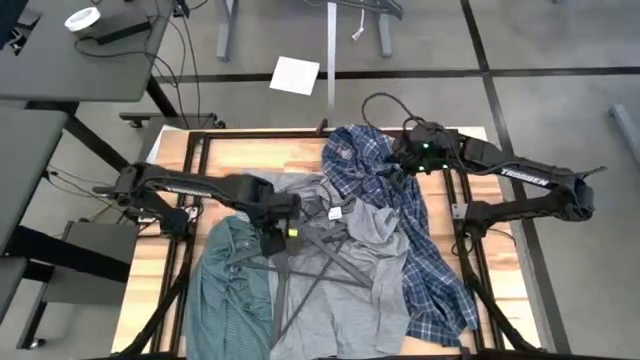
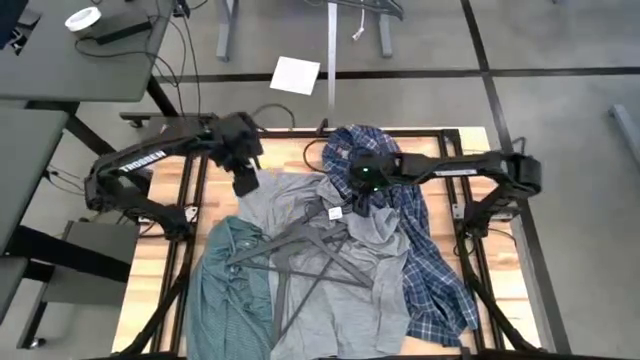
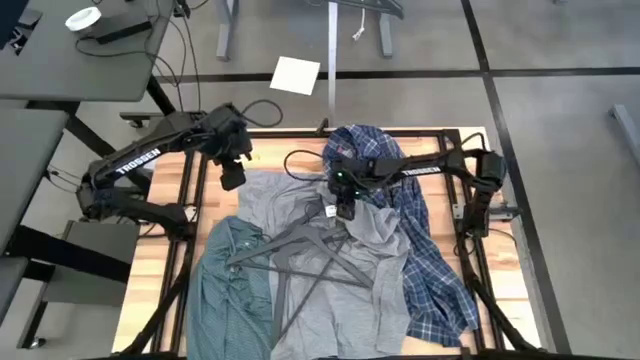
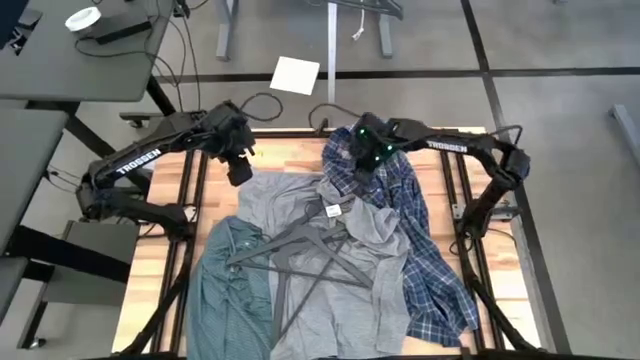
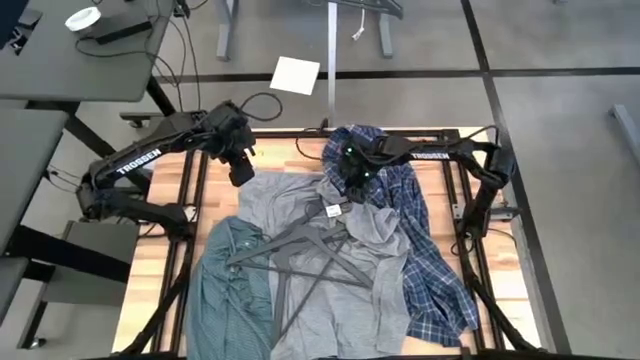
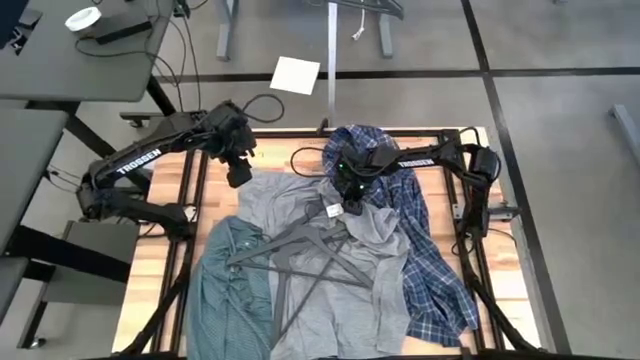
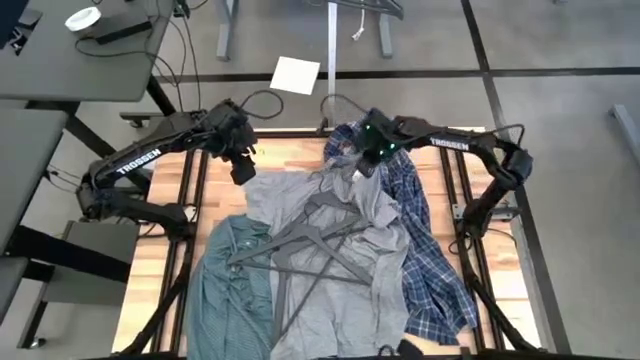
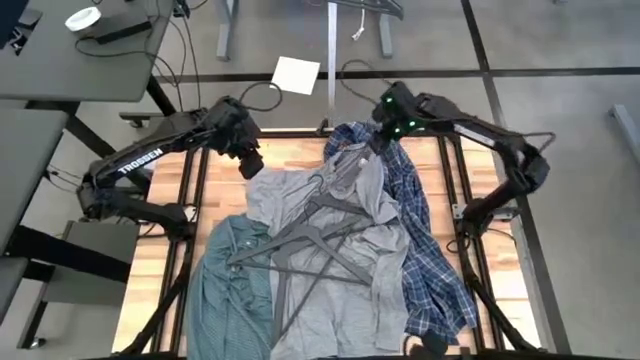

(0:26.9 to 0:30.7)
Task: Hang clothes
Put the gray t-shirt on the gray hanger

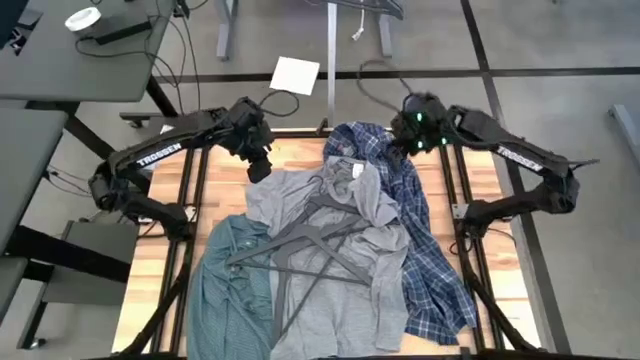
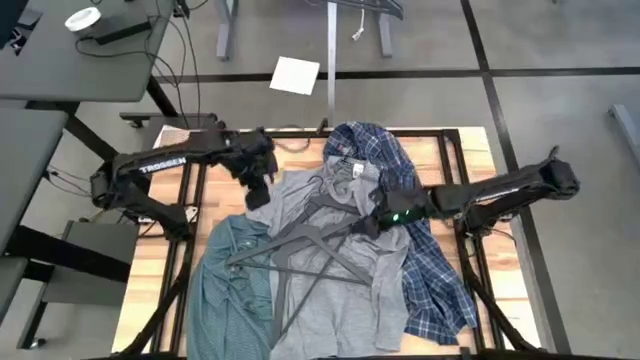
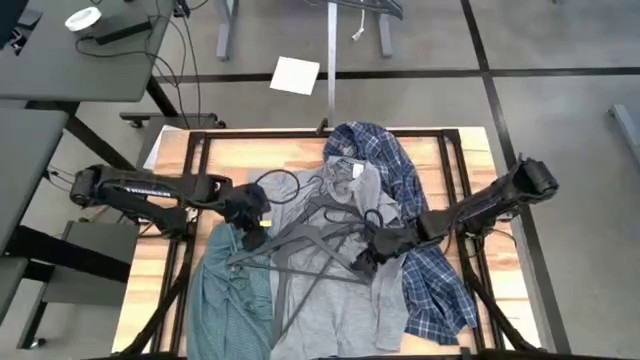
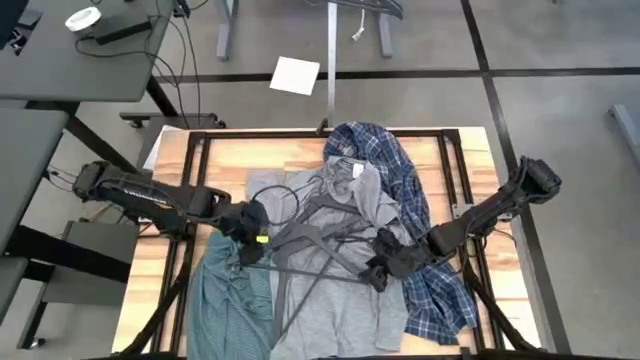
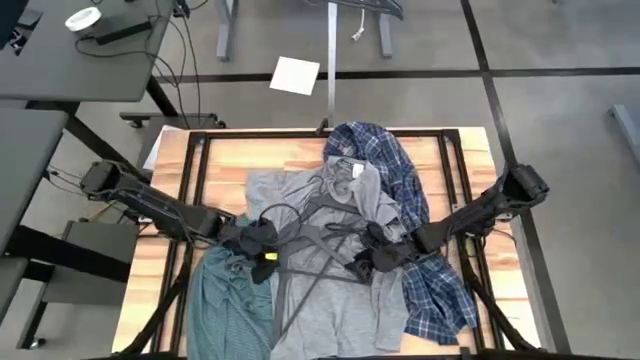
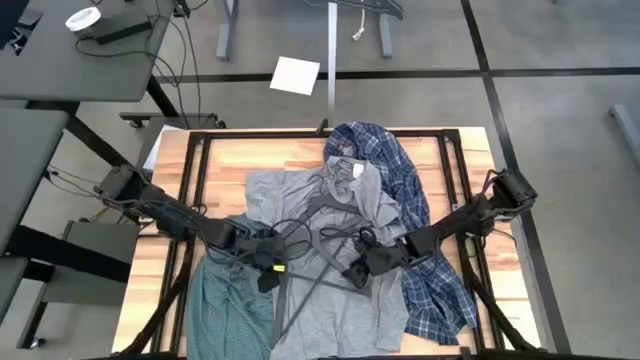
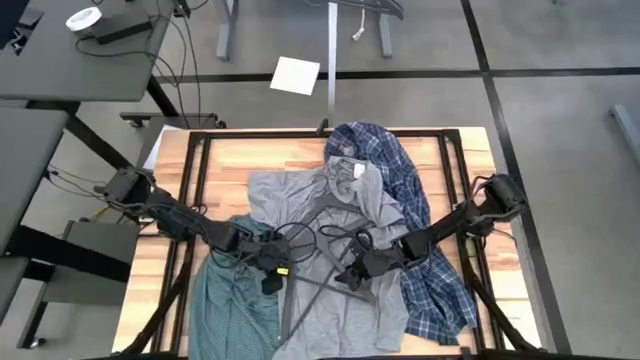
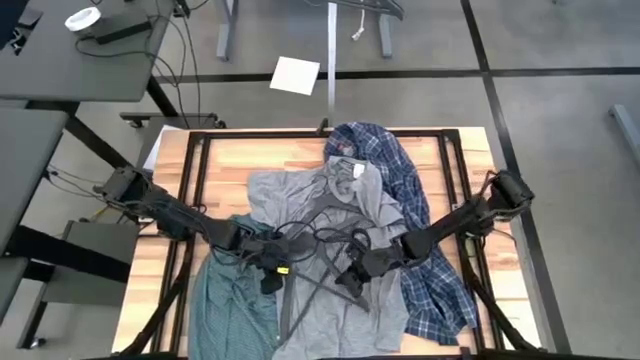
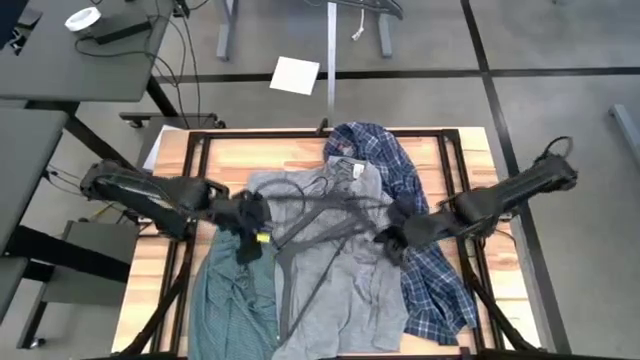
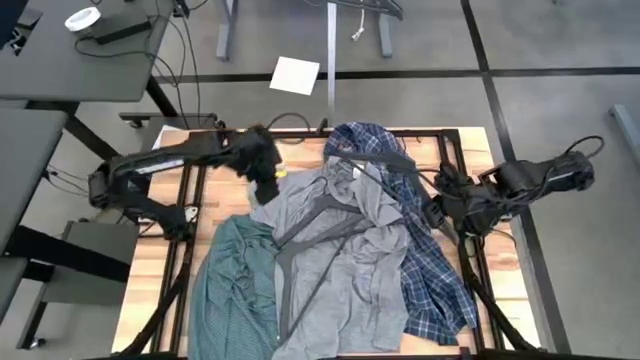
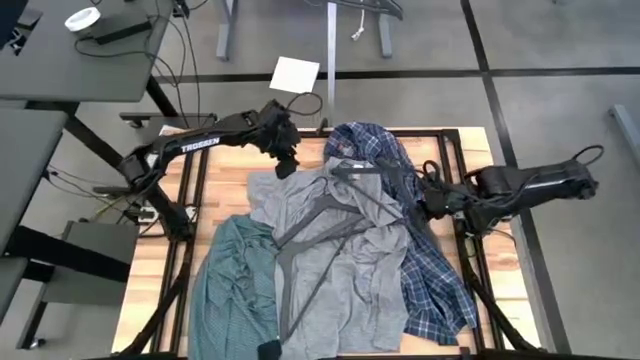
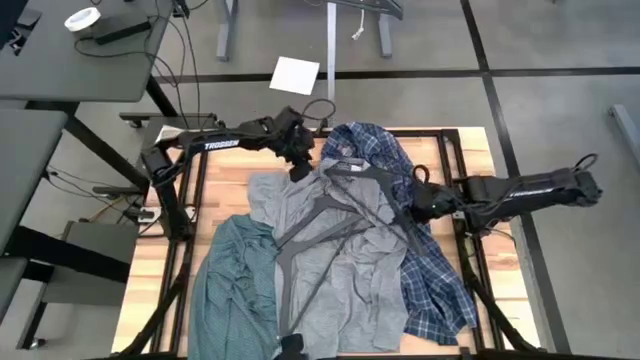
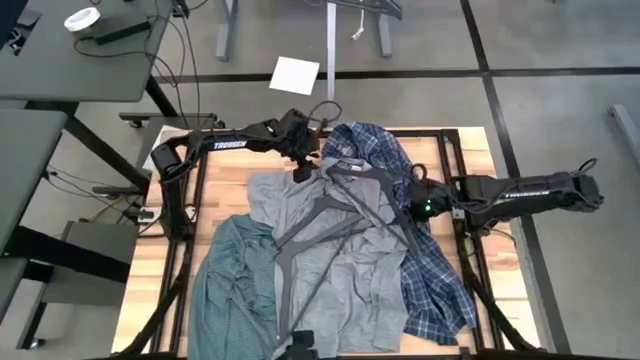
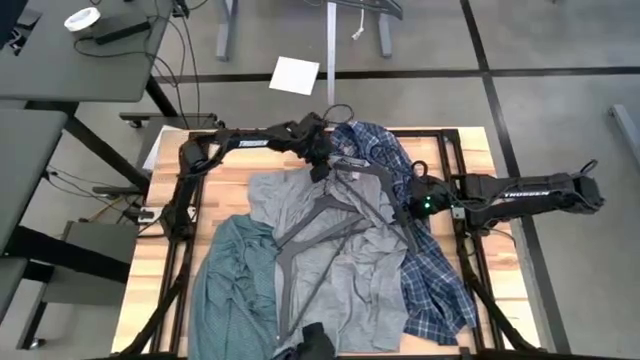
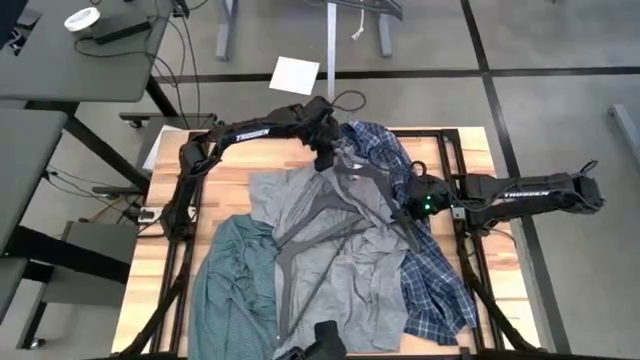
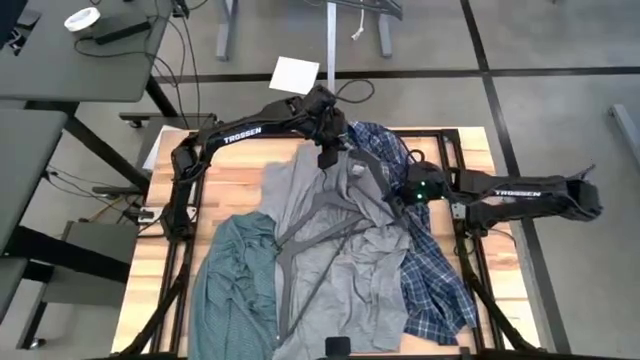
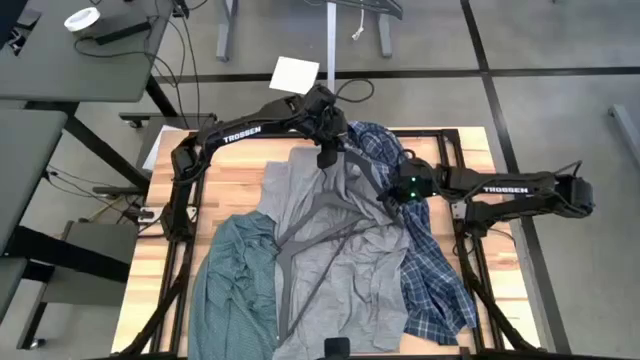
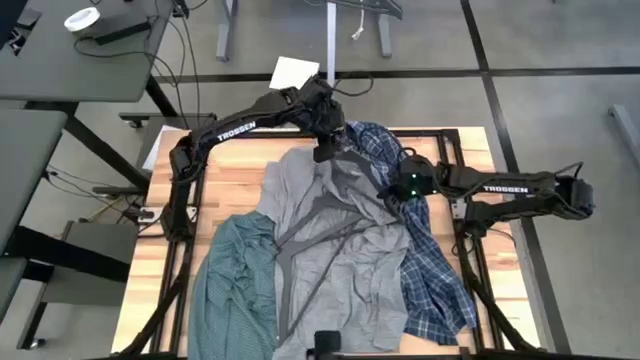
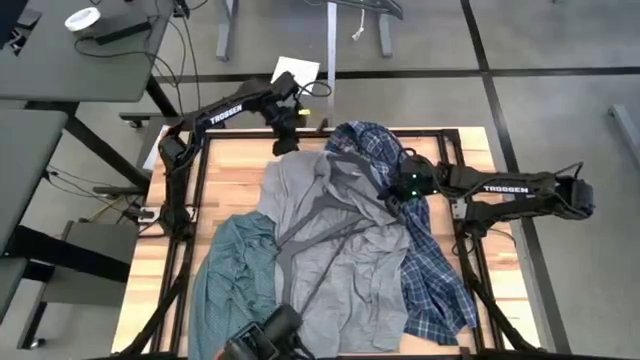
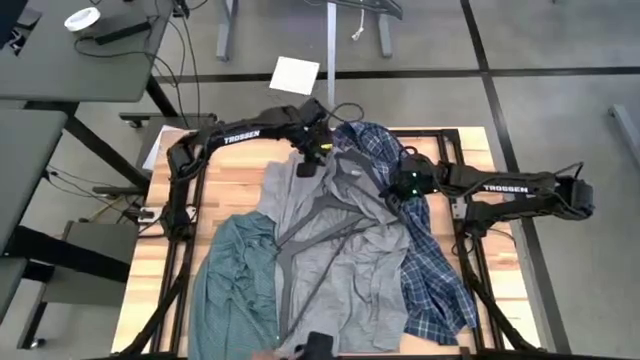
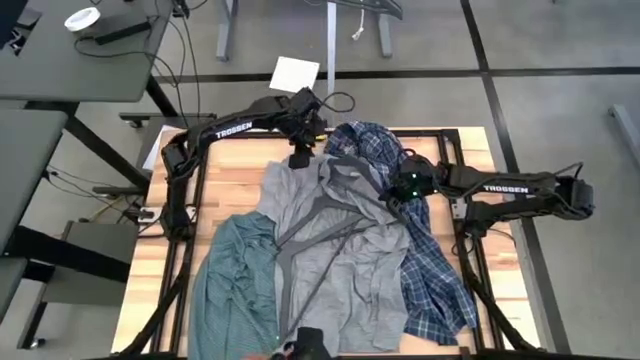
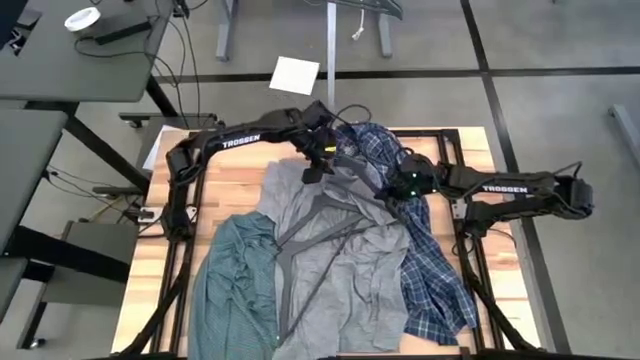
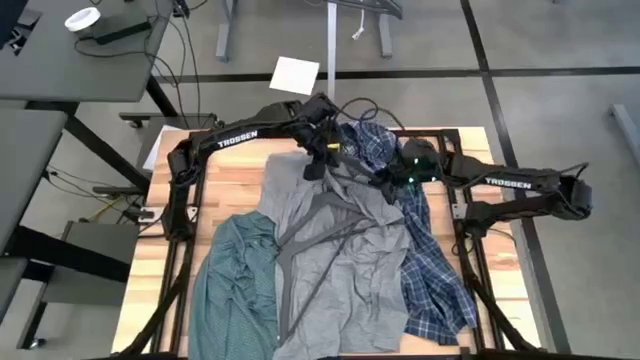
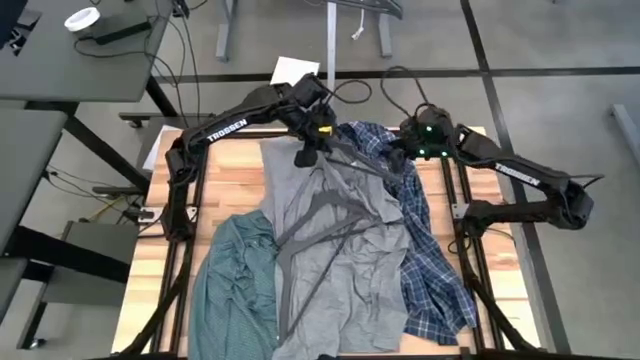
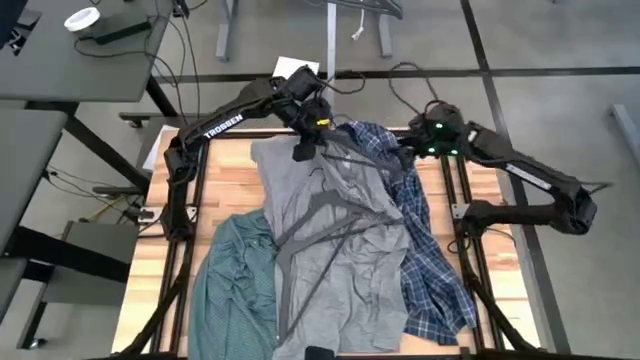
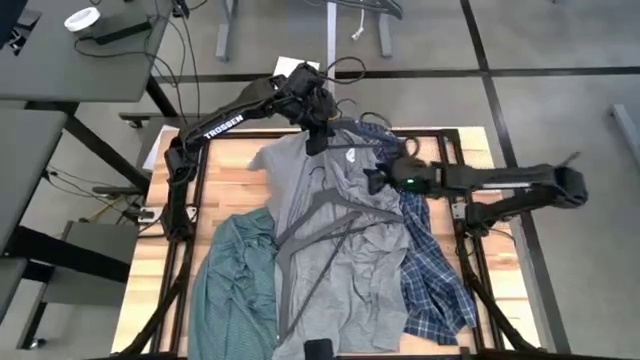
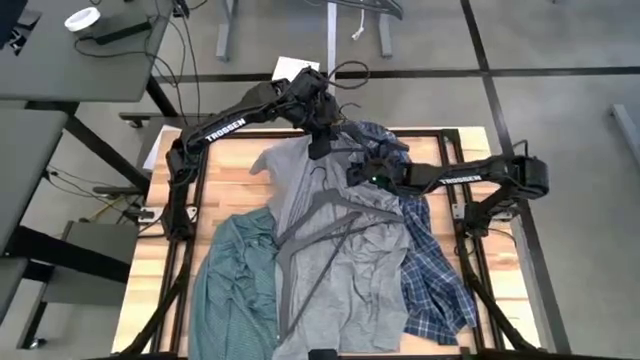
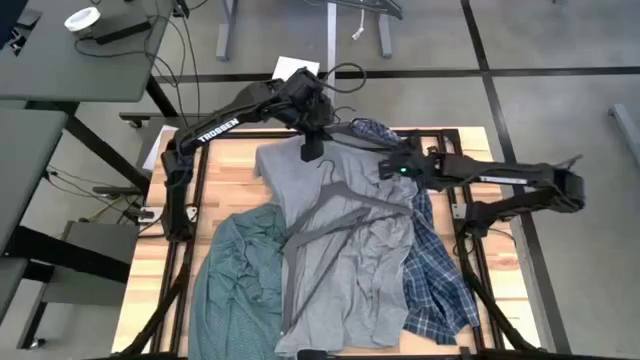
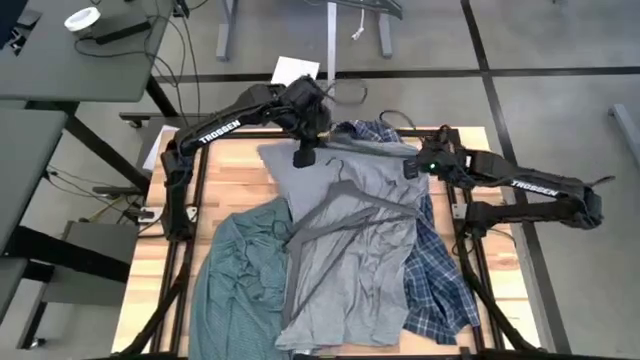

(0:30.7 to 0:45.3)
Put the gray t-shirt on the gray hanger
